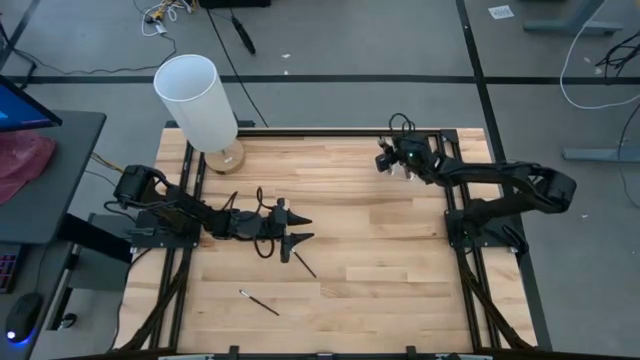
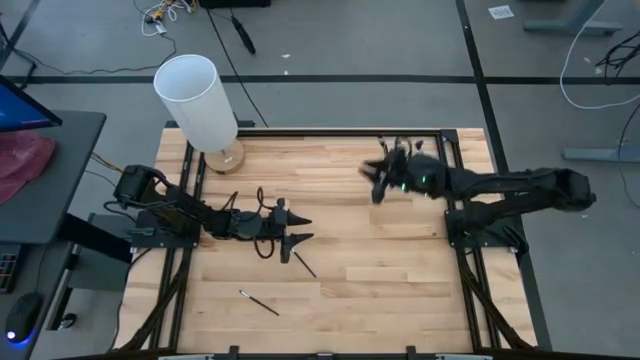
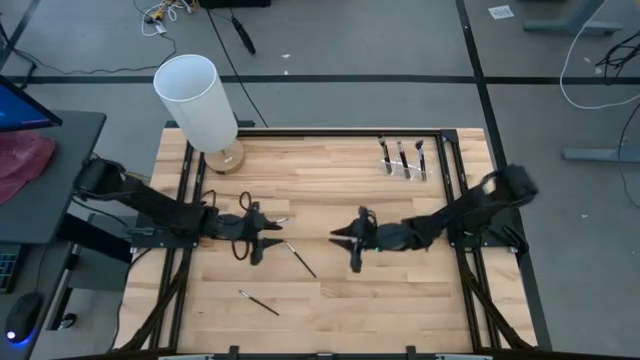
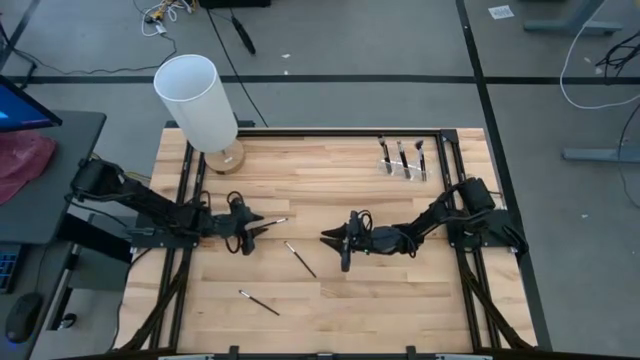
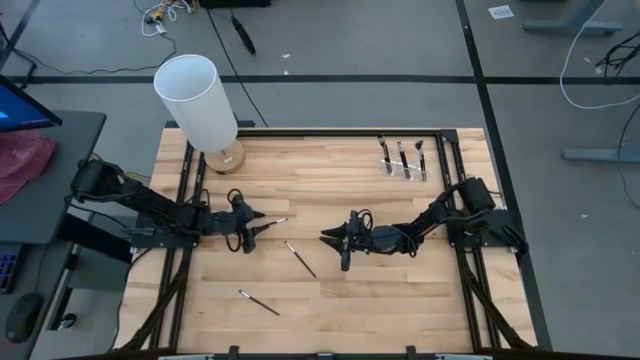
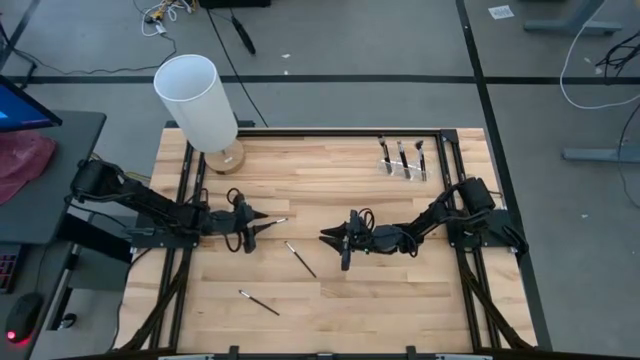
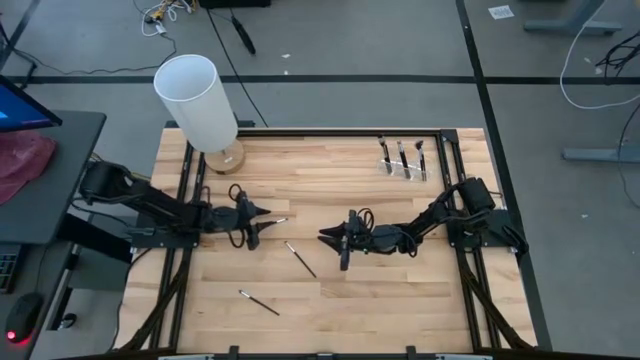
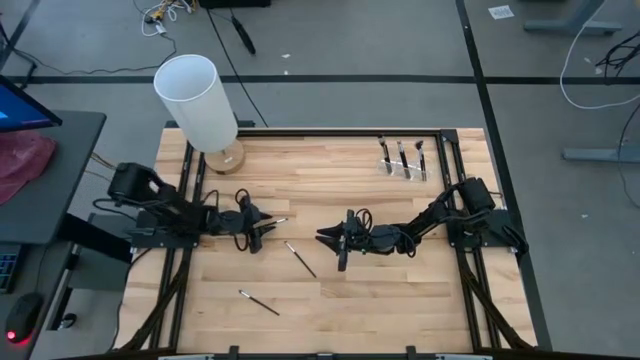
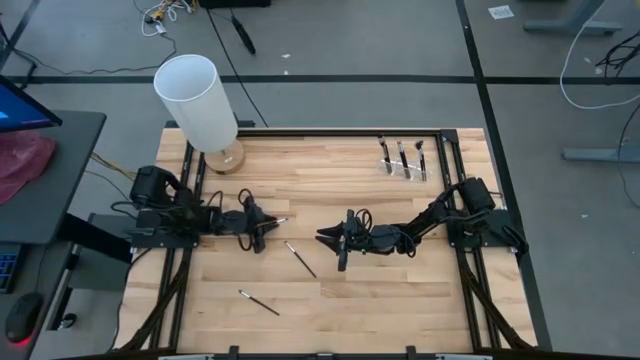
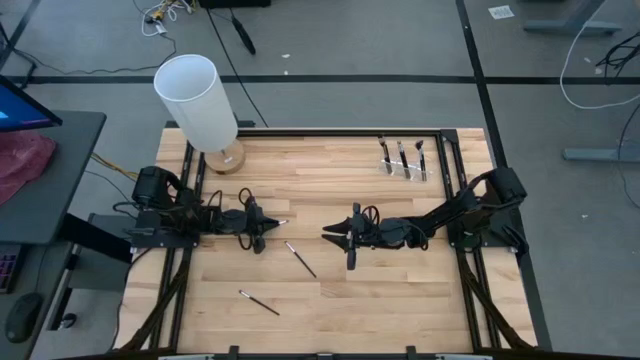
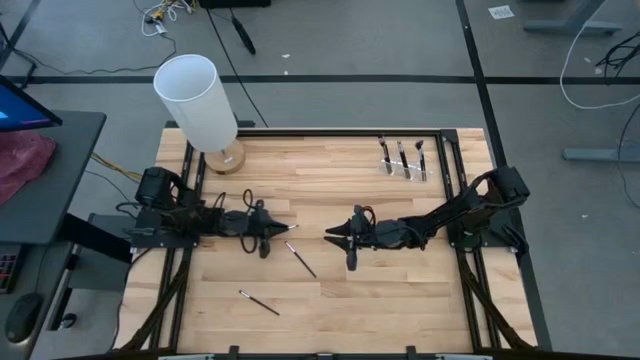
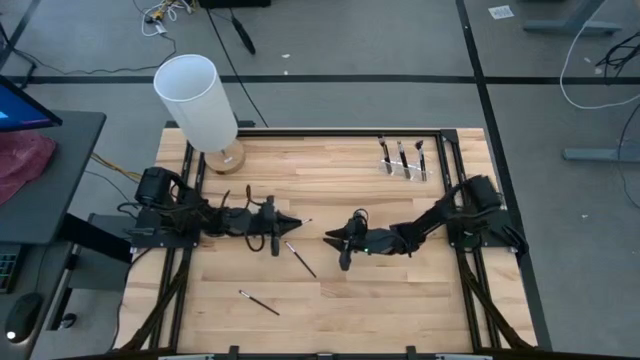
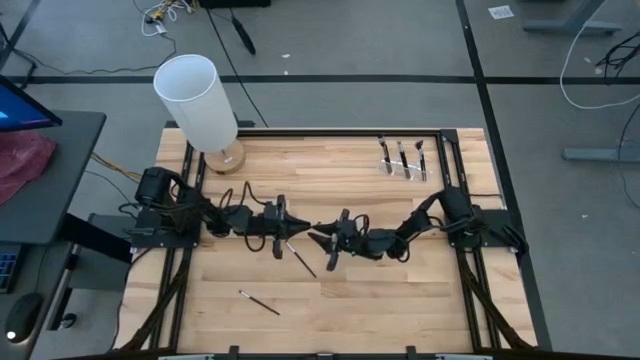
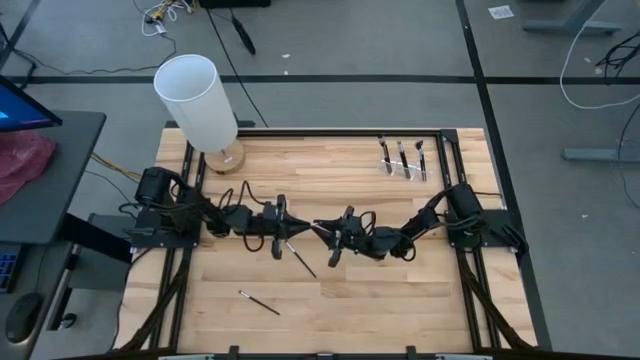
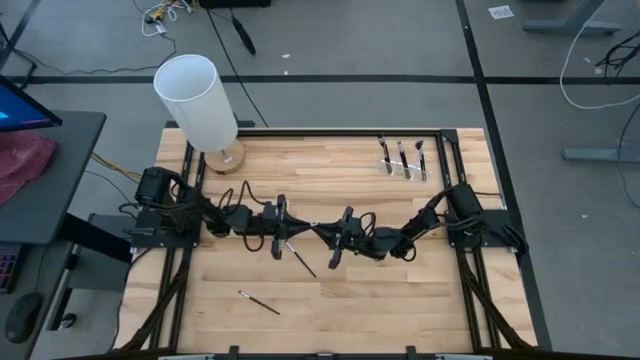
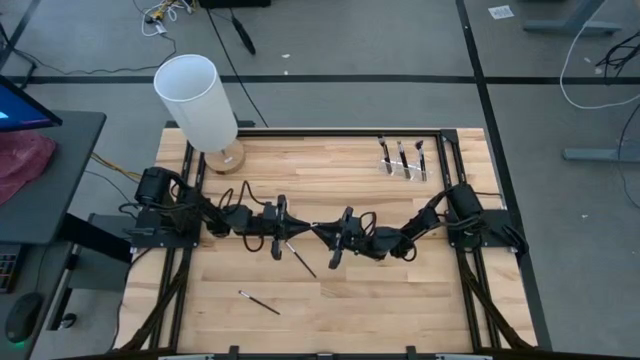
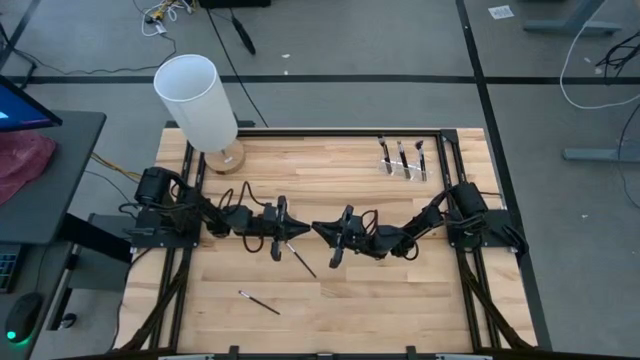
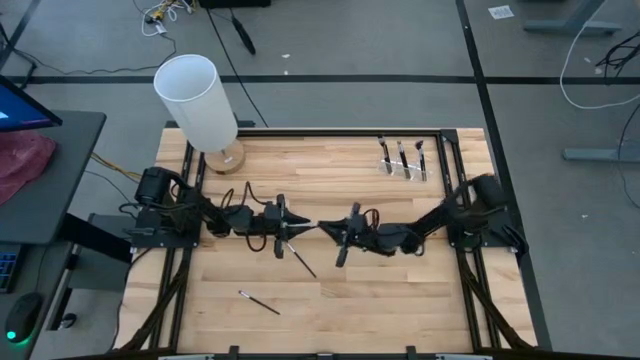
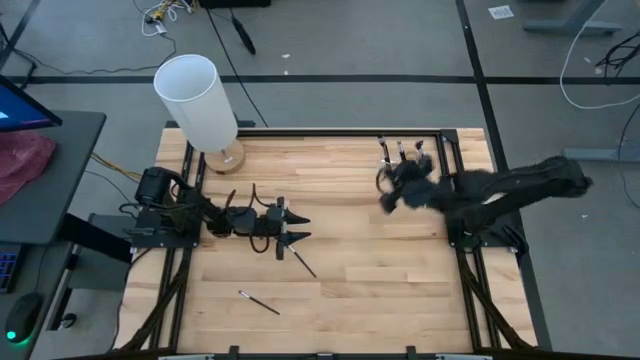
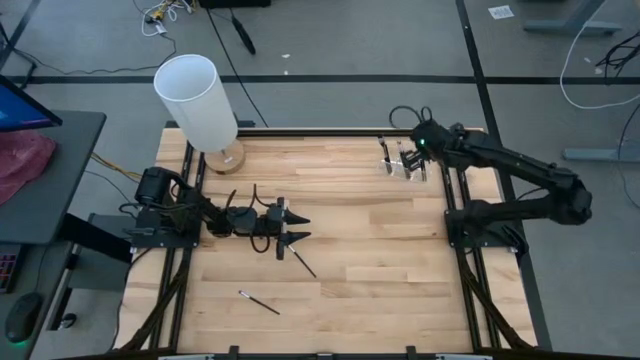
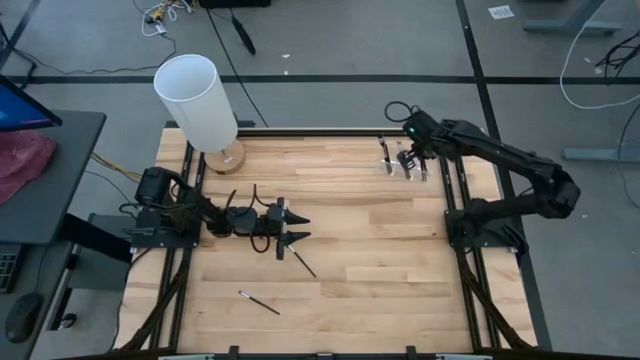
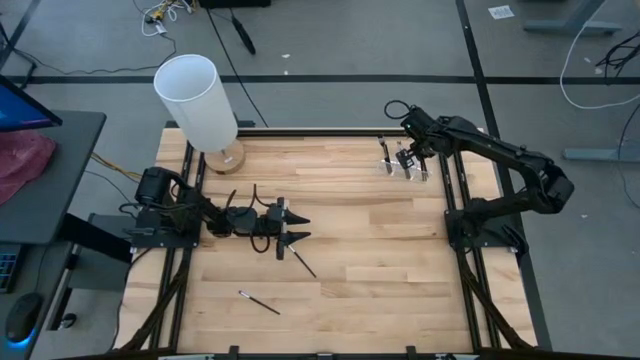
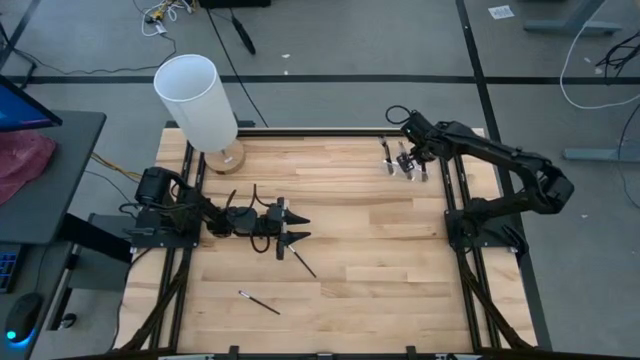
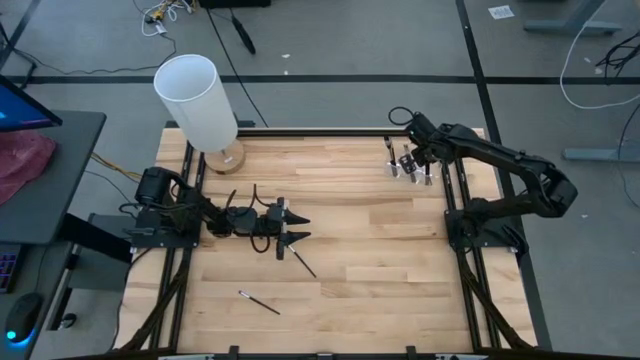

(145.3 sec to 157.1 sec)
Task: Put items in baskets/containers
Put the eyeshadow brush into the transparent organizer

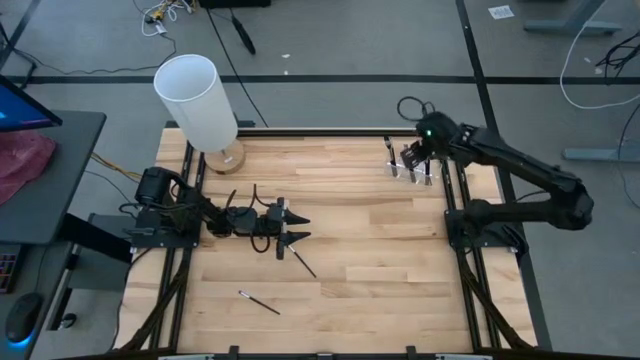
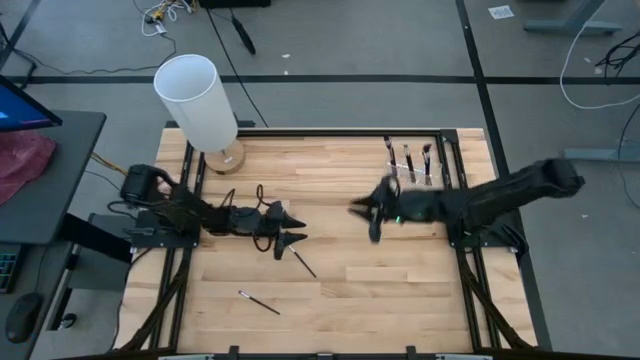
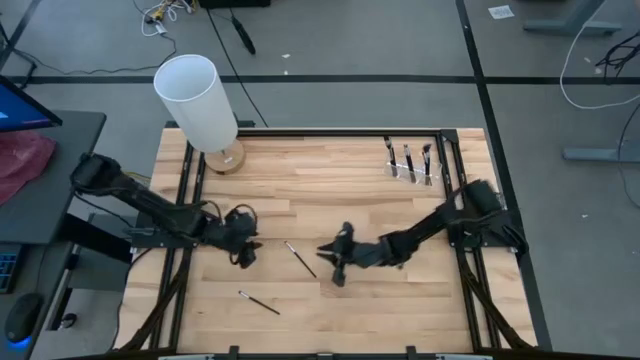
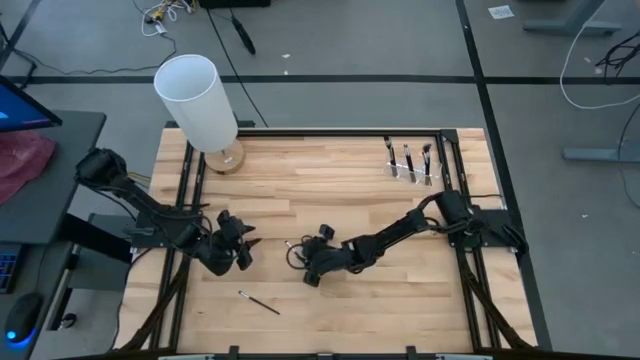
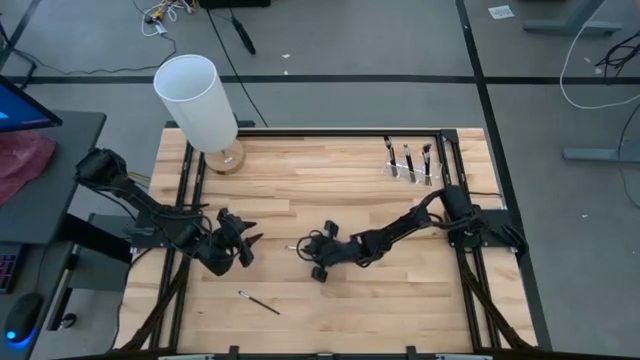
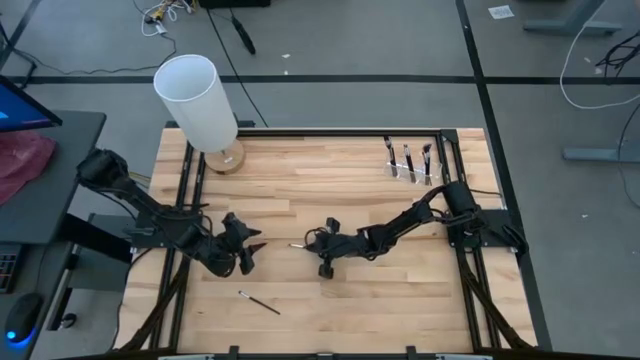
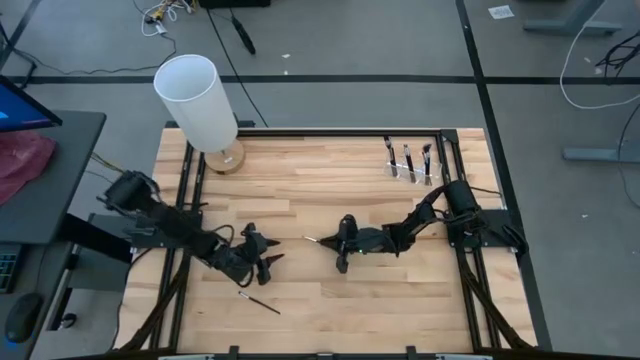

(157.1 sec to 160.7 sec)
Put the eyeshadow brush into the transparent organizer

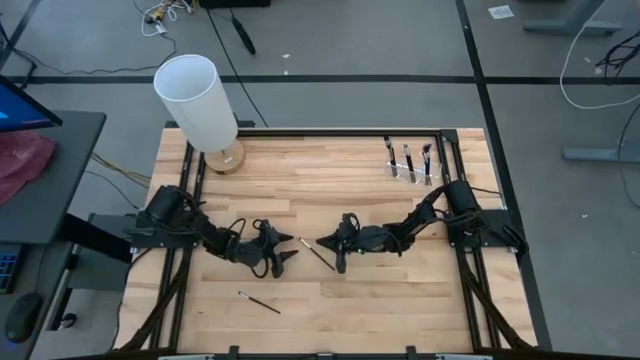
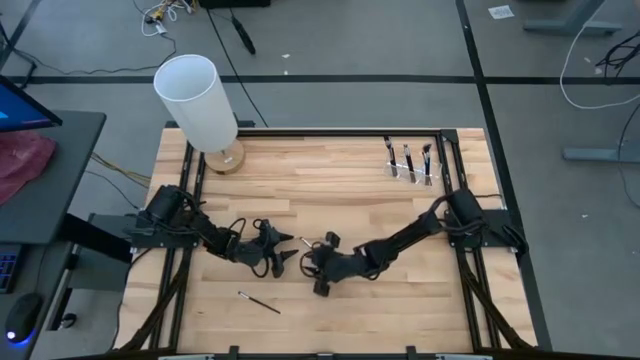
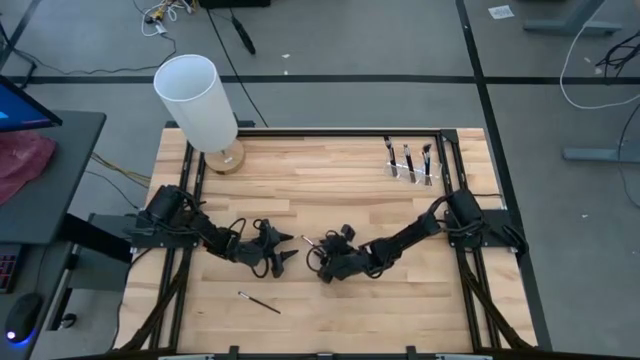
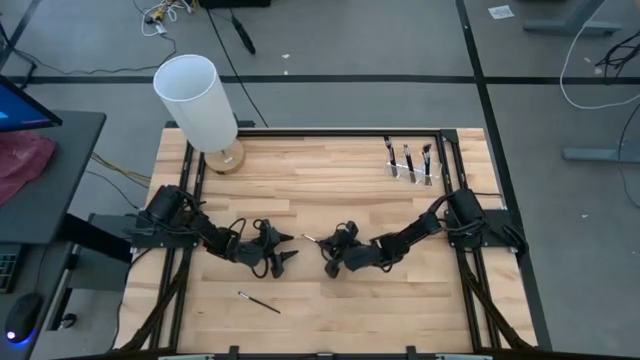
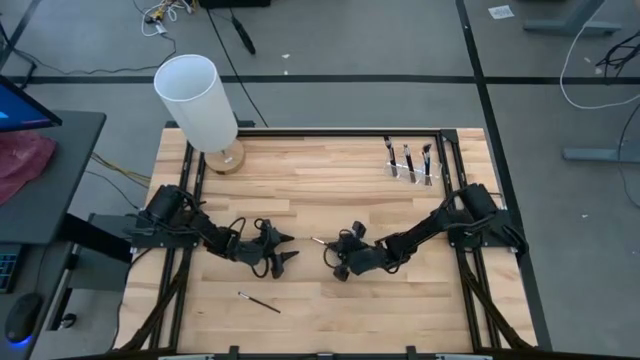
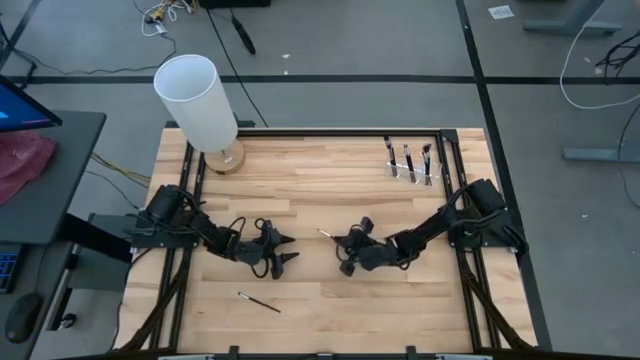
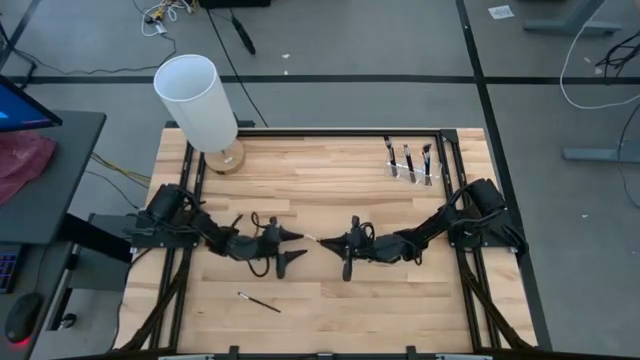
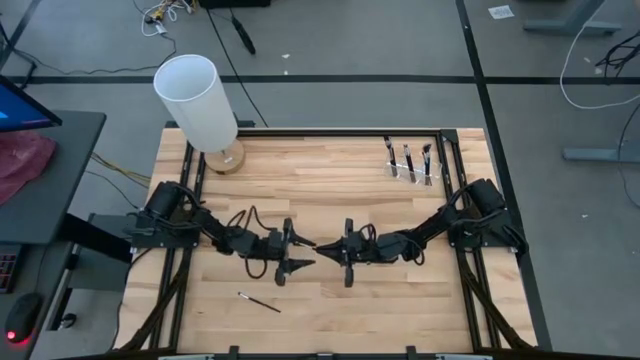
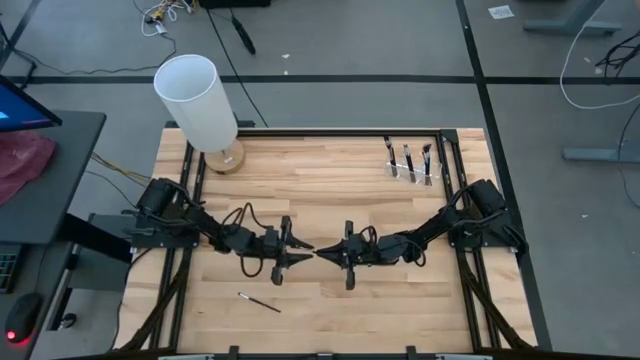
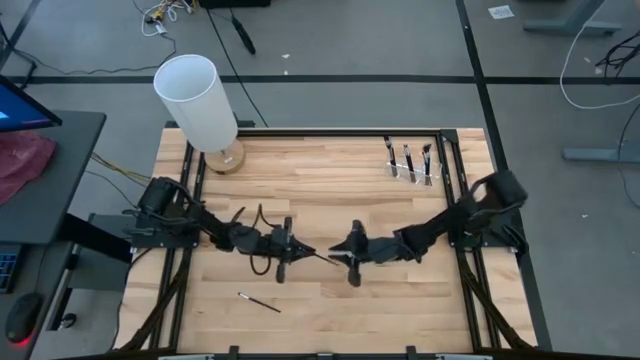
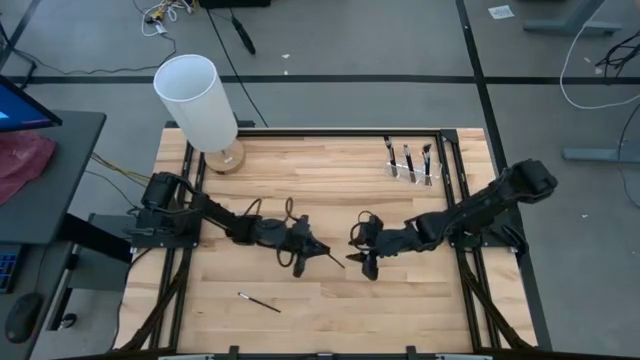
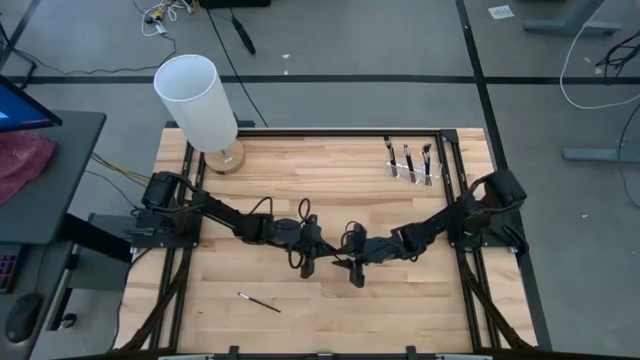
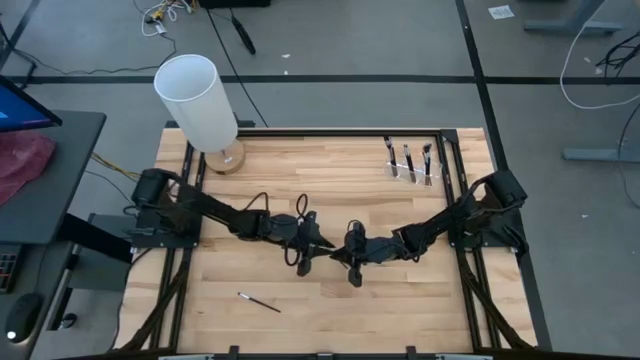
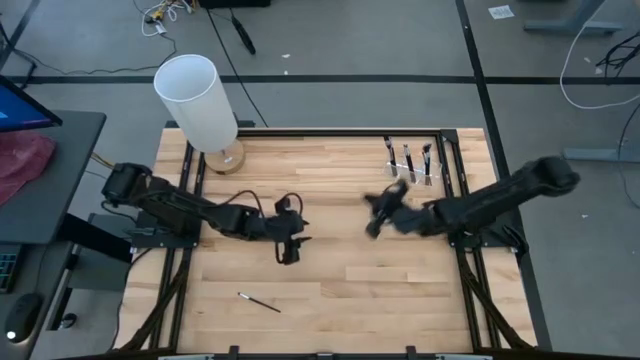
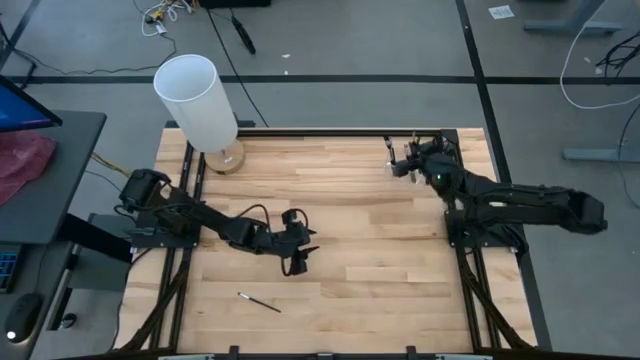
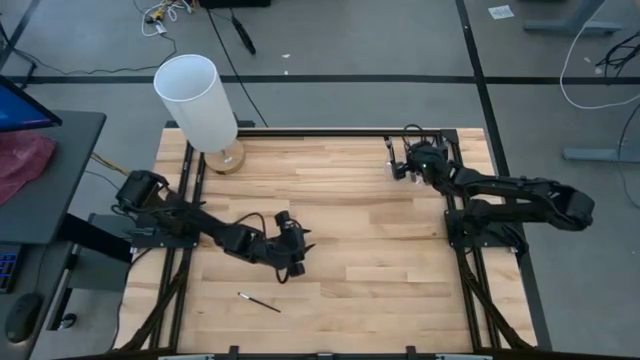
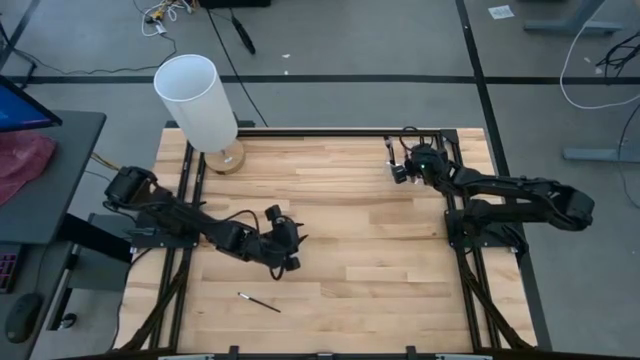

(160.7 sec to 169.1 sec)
Put the eyeshadow brush into the transparent organizer
